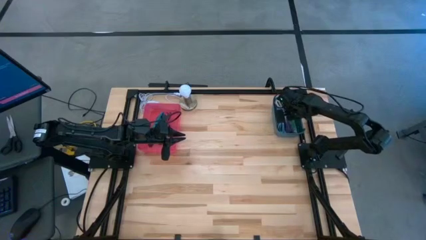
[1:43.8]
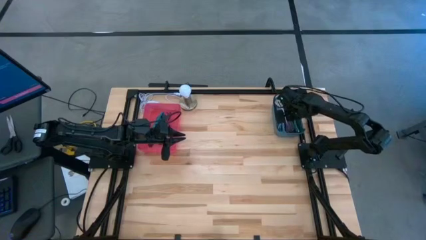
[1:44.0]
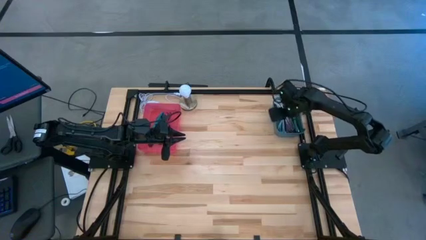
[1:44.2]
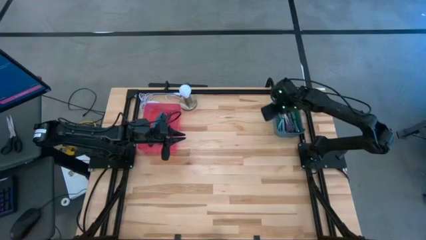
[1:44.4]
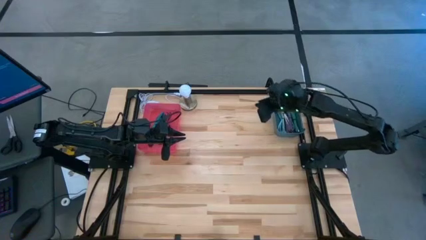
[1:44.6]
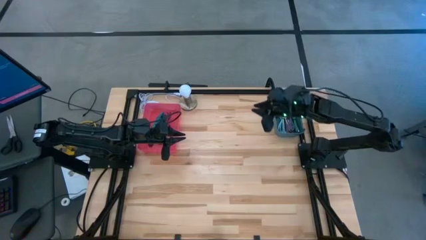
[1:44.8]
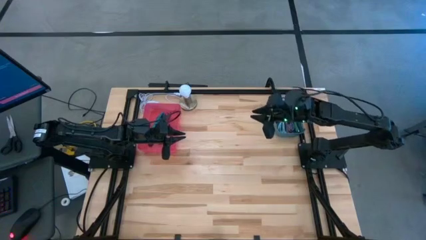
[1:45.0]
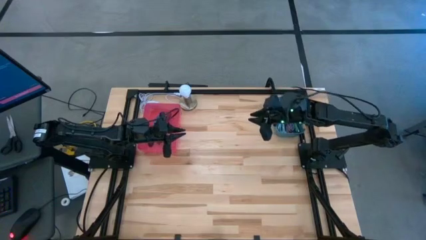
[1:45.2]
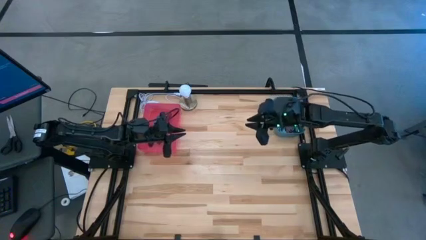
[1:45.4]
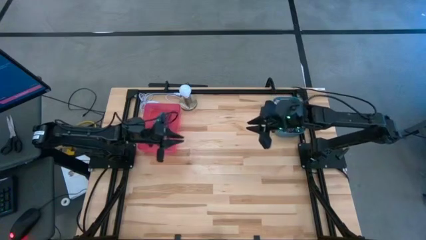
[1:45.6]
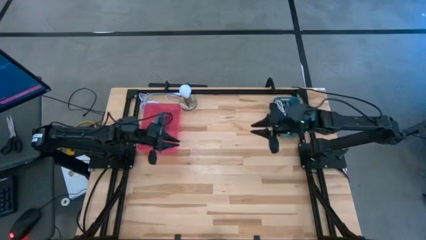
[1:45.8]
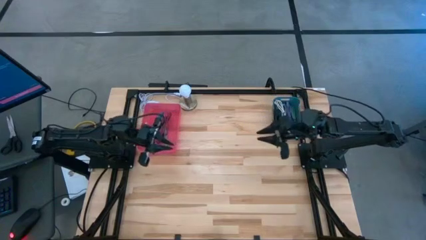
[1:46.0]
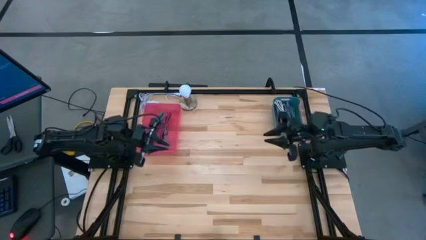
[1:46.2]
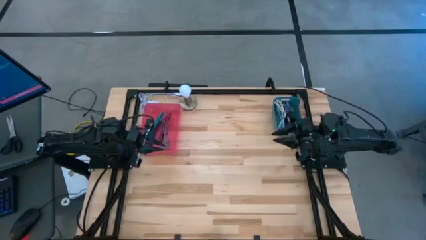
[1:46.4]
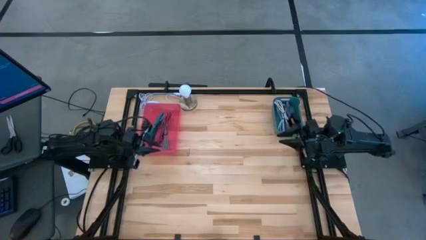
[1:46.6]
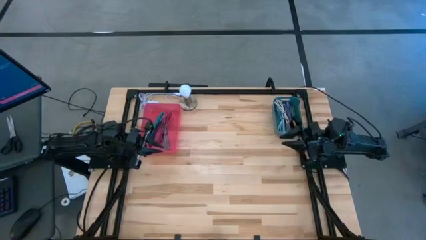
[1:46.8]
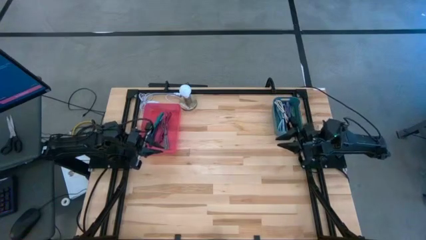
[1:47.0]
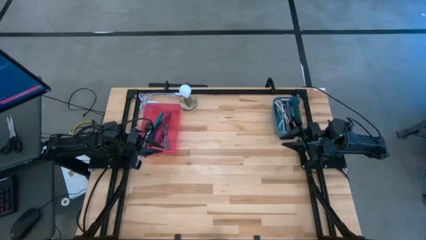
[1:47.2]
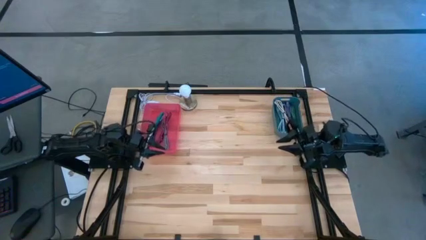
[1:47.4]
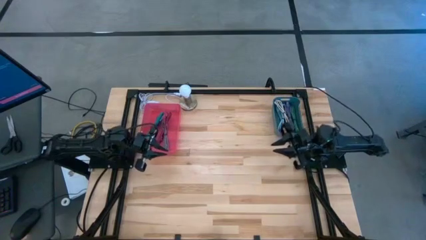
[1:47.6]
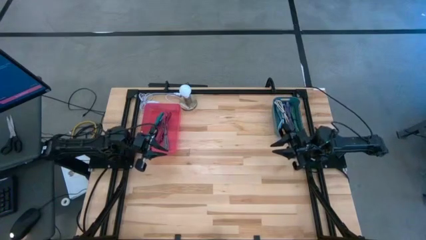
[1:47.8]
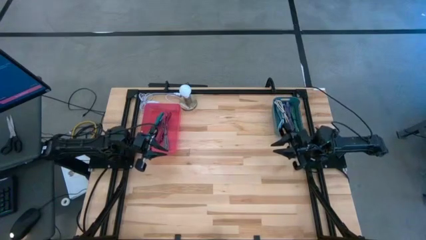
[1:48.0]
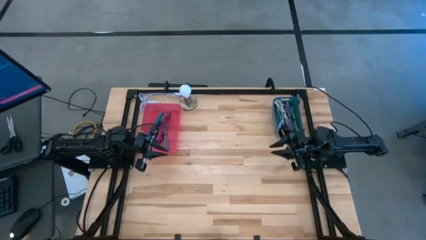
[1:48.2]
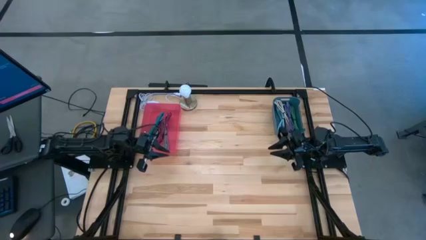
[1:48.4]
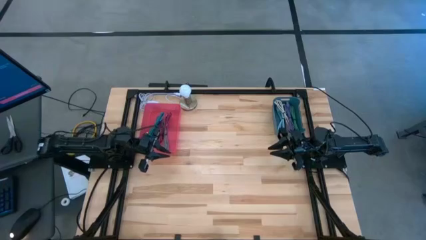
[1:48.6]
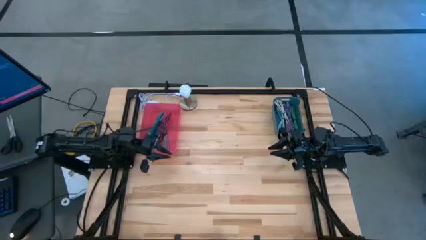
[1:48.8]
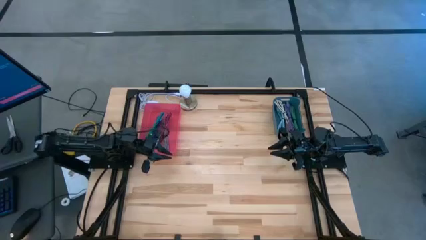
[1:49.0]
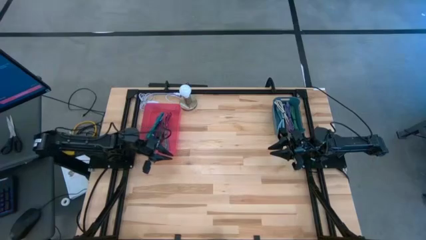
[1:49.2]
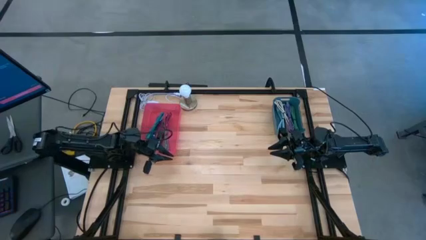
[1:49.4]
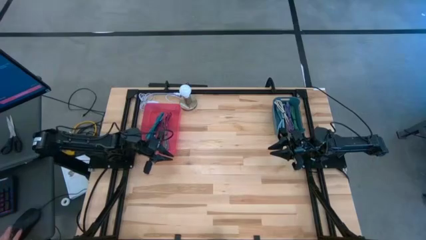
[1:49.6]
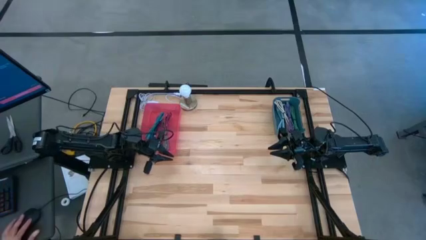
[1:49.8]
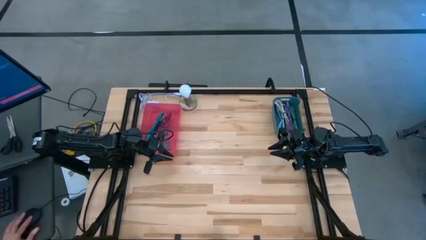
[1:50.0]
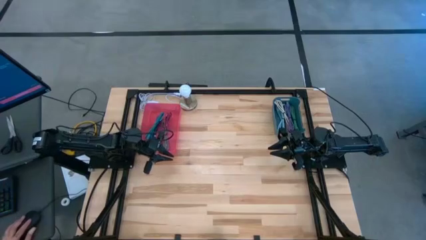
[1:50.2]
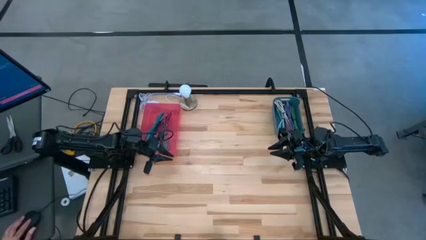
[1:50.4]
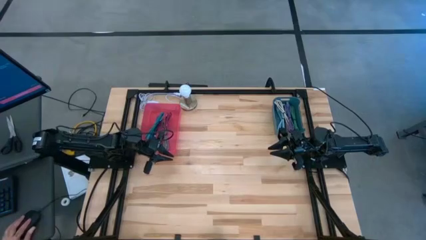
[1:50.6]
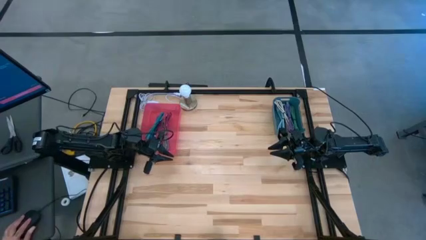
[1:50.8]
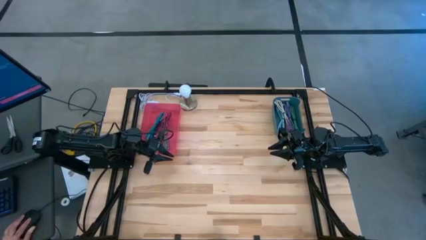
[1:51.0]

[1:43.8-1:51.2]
Task: Pick & Place USB Port
Return to Home Position

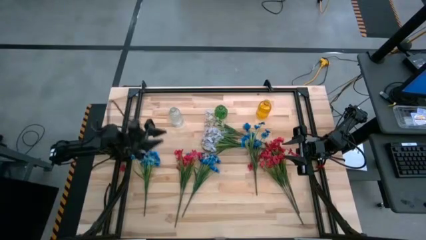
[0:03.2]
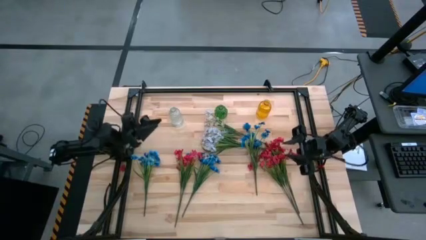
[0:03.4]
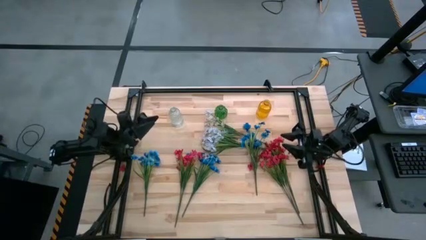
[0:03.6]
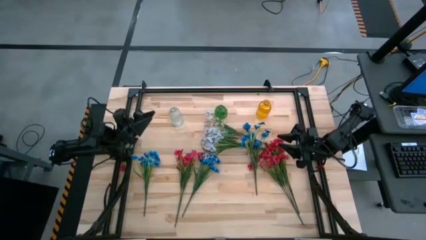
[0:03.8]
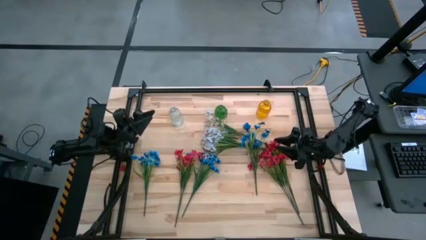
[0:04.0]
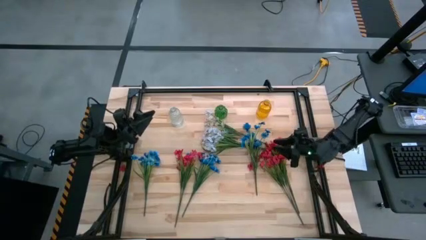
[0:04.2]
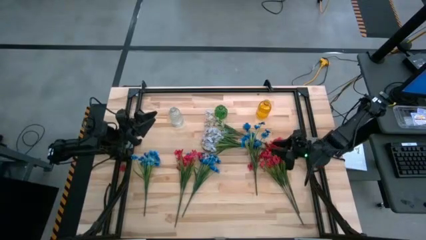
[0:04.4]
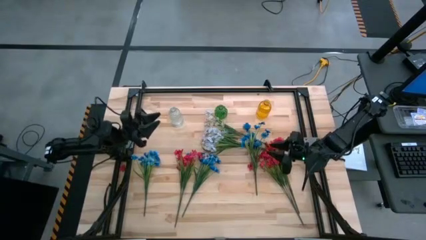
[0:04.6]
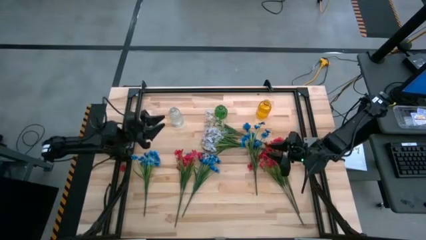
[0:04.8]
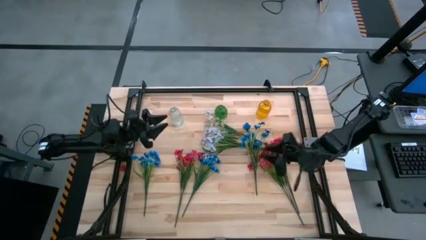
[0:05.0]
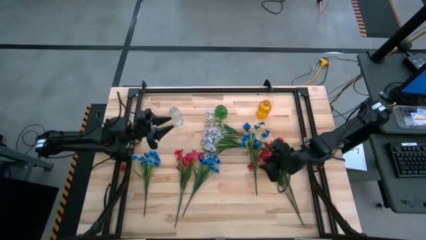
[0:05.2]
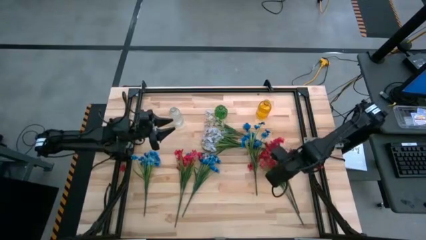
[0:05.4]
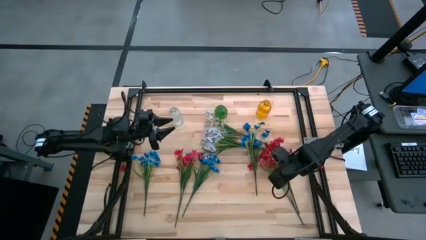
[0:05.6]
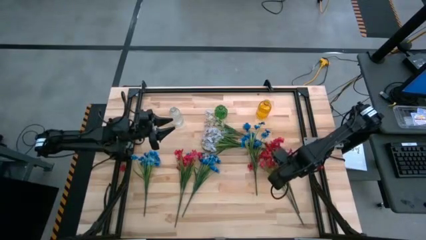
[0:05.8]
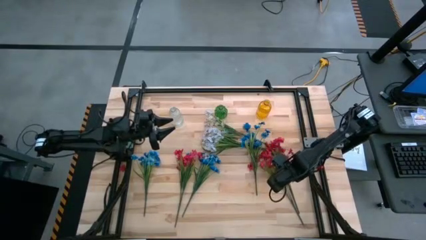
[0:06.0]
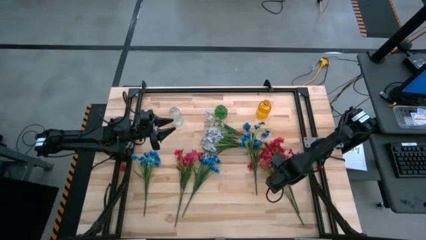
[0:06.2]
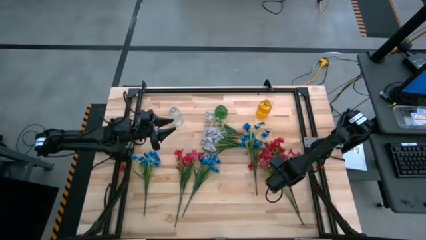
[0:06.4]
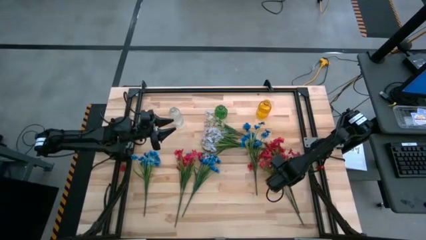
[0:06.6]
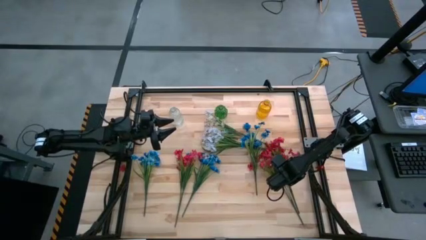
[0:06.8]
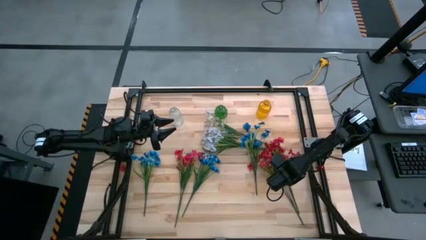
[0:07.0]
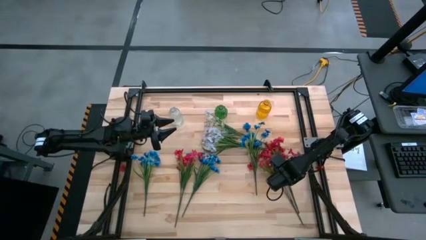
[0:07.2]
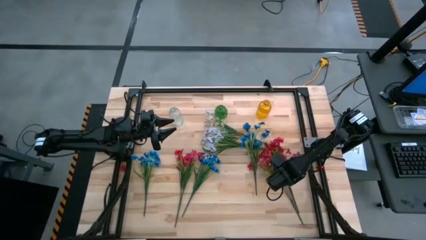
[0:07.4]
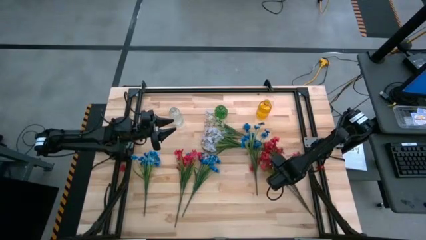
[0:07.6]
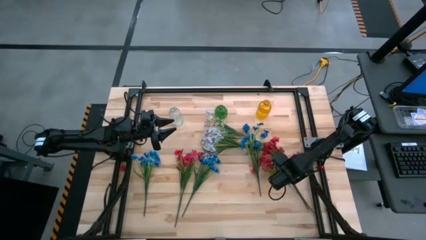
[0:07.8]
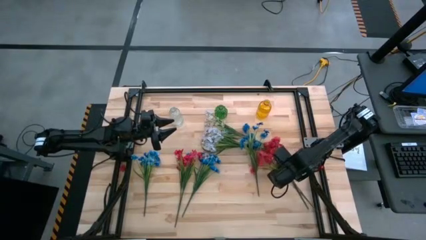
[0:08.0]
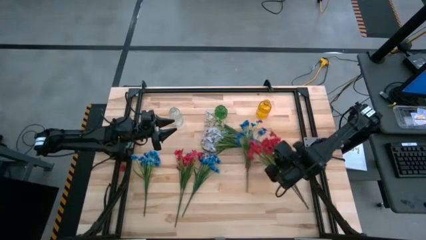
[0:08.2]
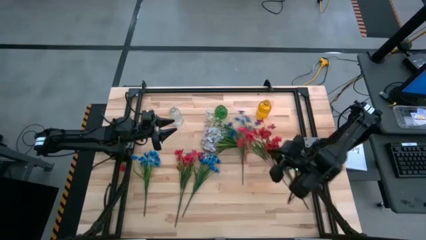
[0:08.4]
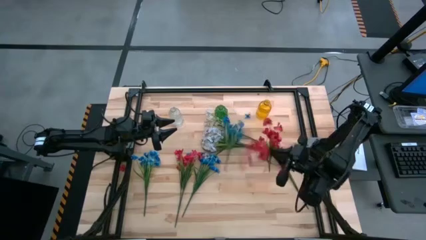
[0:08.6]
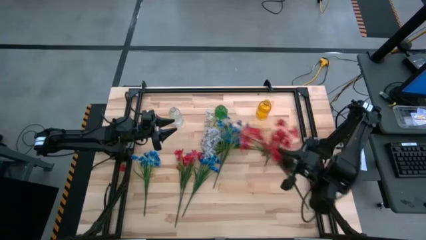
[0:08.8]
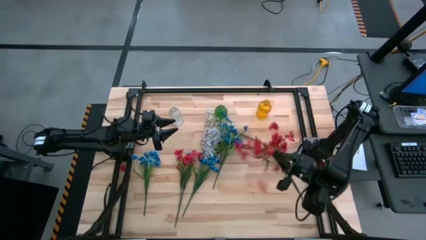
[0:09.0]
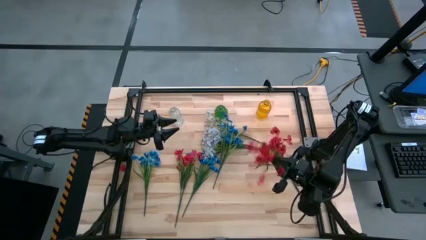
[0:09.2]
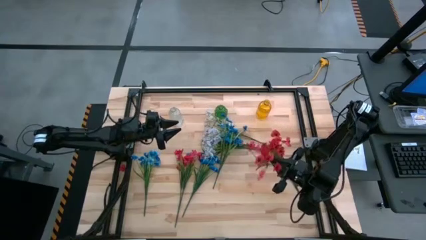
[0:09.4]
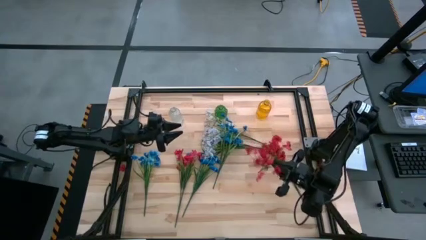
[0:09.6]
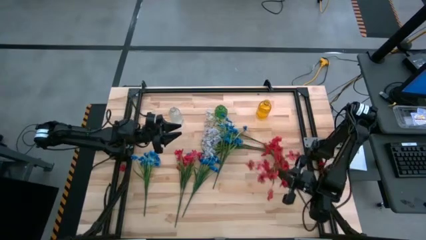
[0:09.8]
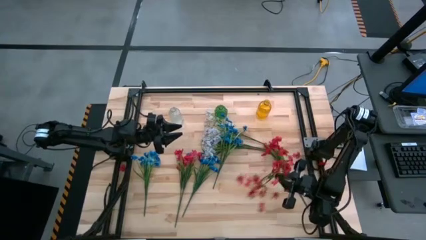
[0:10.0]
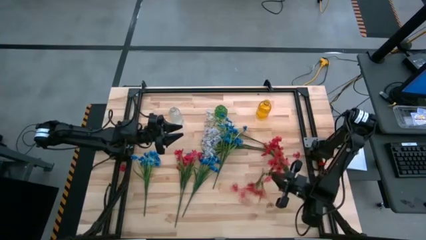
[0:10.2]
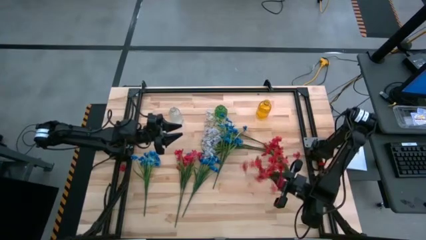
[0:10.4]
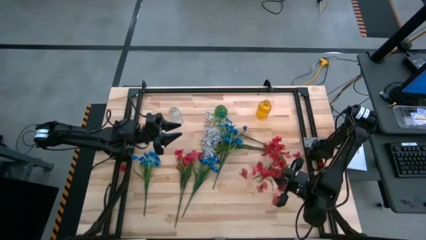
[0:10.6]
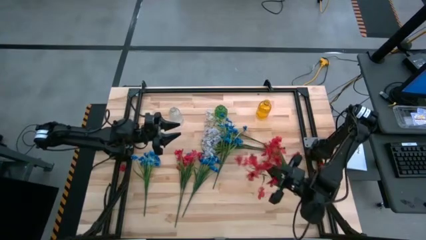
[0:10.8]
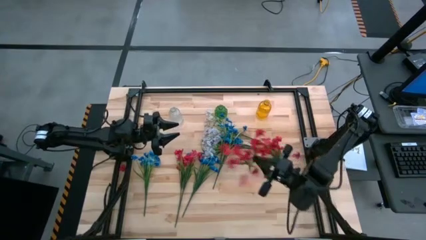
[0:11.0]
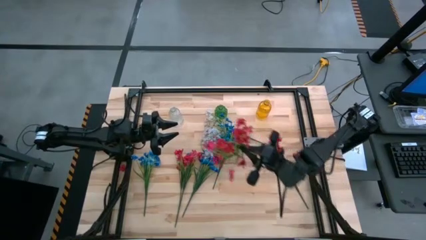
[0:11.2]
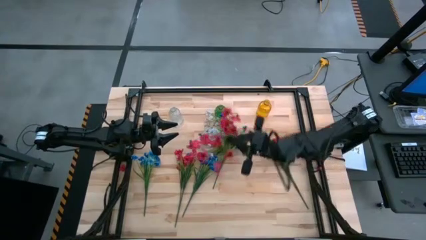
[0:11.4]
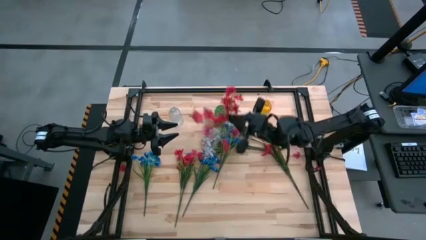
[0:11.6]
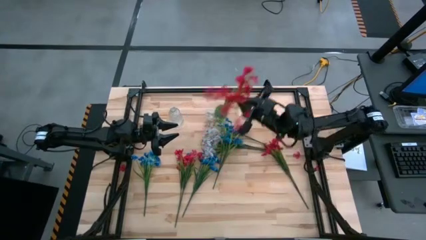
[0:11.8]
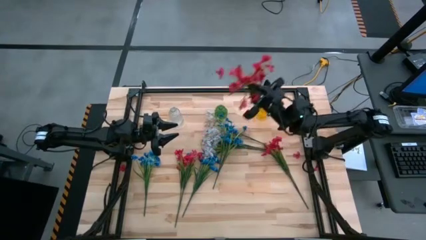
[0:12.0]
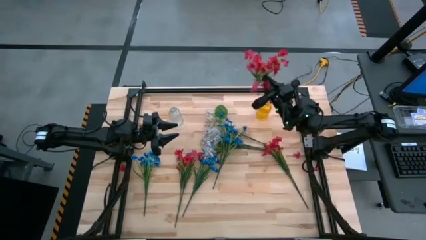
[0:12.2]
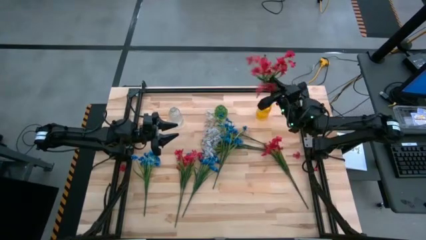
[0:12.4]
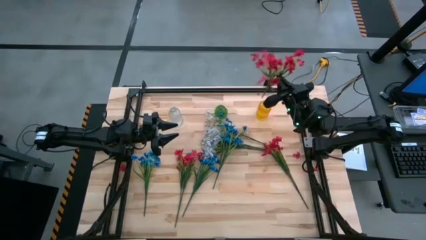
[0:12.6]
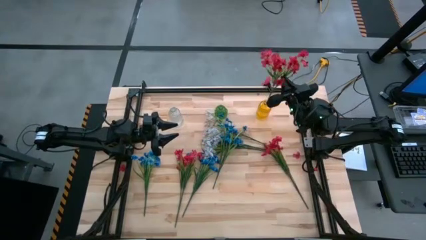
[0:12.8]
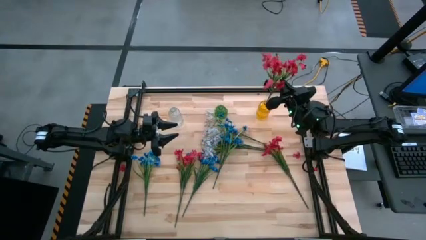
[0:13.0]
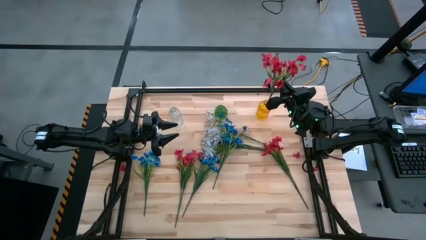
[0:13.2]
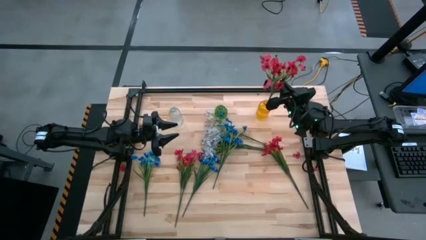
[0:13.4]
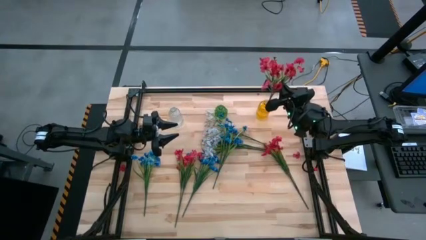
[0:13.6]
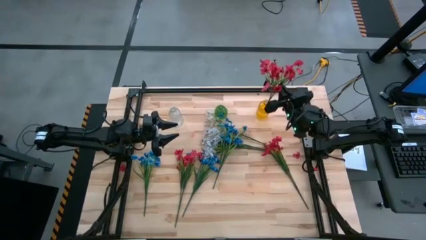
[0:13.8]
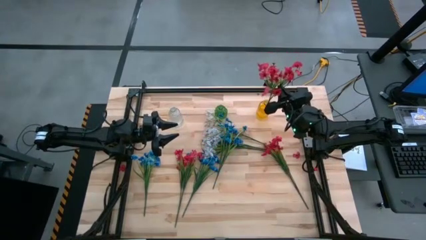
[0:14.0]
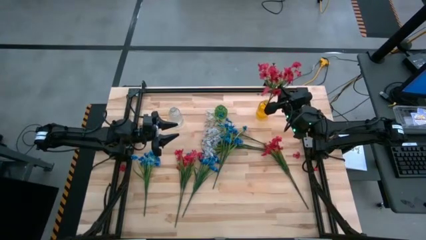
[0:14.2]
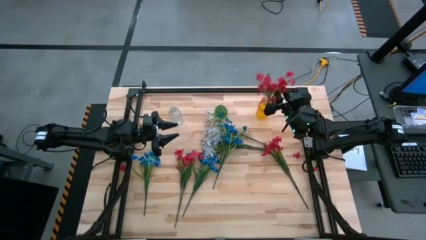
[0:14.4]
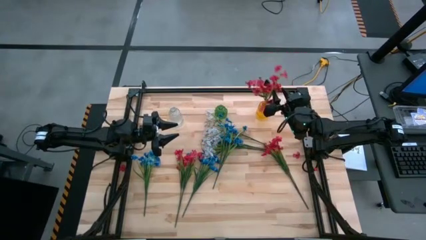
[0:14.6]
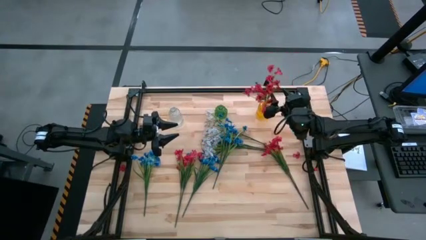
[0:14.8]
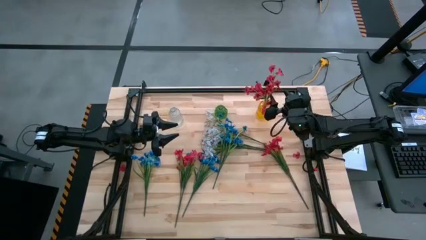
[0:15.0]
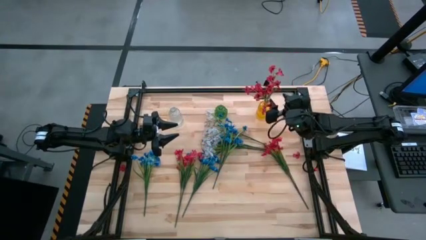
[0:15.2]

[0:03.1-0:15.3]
Task: Sort flowers into vase by color
Put the red flowers into the yellow vase
